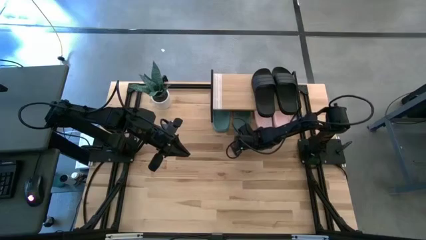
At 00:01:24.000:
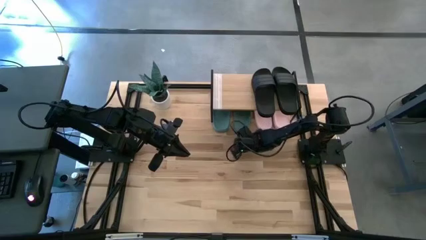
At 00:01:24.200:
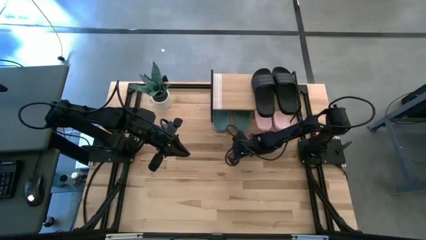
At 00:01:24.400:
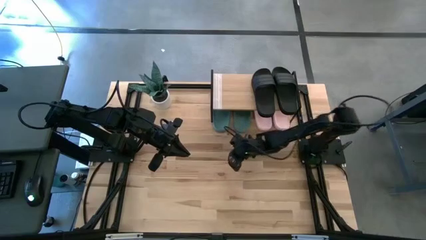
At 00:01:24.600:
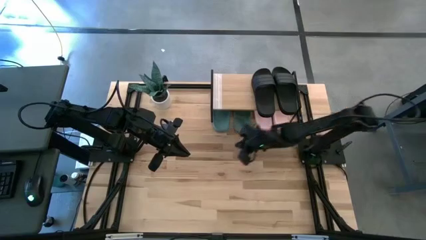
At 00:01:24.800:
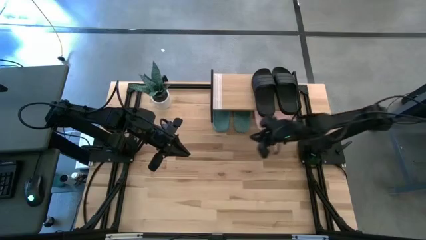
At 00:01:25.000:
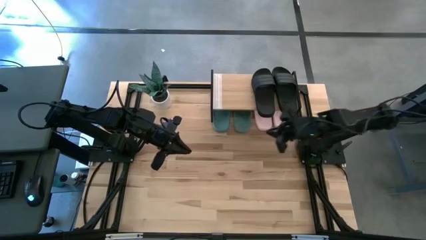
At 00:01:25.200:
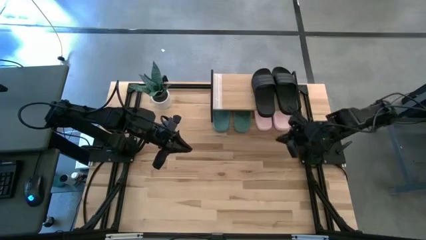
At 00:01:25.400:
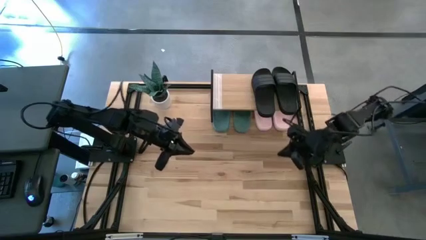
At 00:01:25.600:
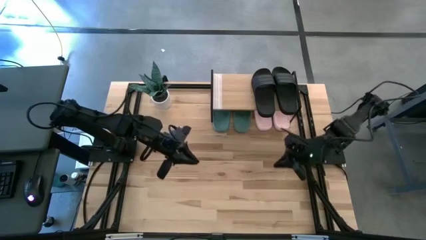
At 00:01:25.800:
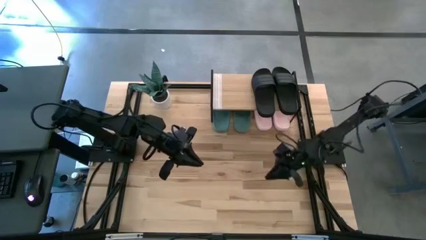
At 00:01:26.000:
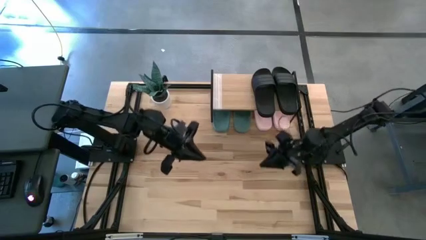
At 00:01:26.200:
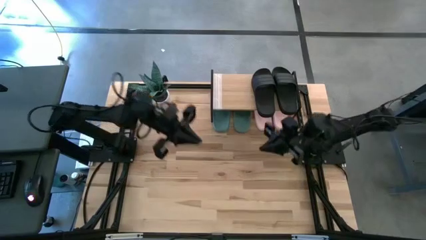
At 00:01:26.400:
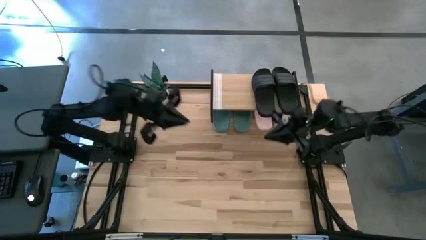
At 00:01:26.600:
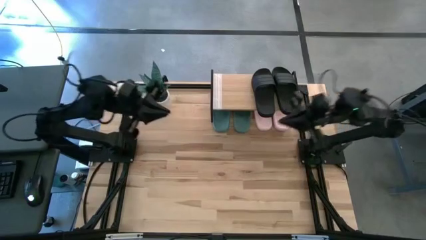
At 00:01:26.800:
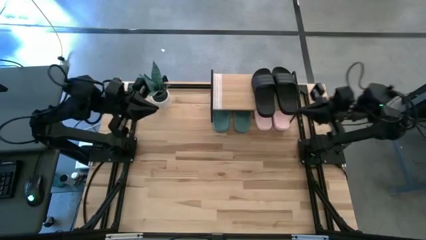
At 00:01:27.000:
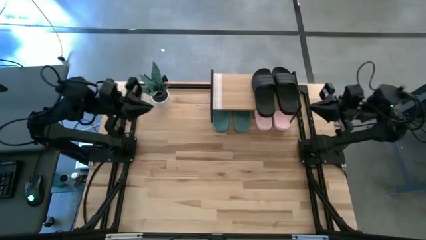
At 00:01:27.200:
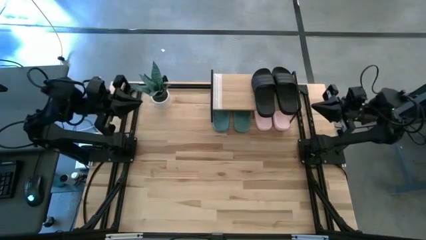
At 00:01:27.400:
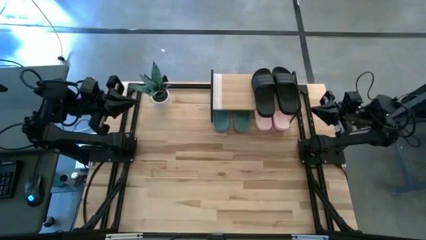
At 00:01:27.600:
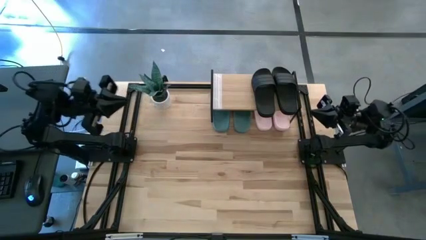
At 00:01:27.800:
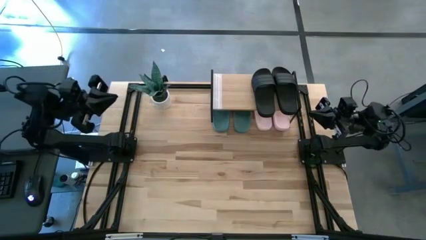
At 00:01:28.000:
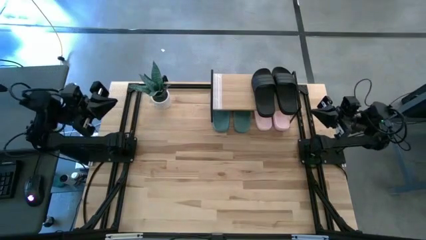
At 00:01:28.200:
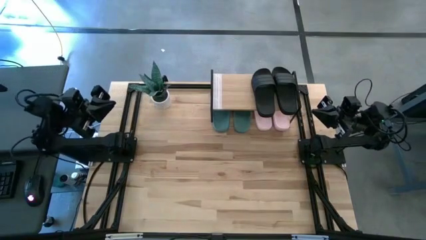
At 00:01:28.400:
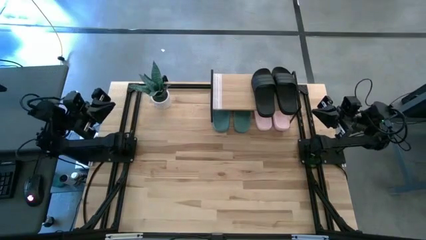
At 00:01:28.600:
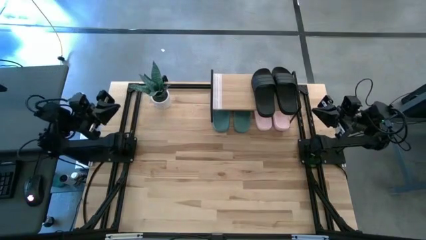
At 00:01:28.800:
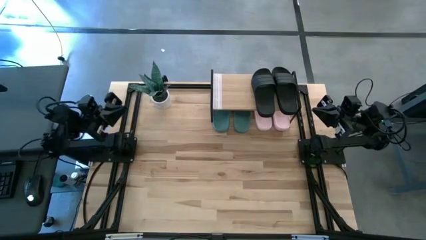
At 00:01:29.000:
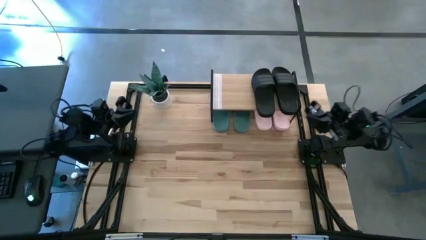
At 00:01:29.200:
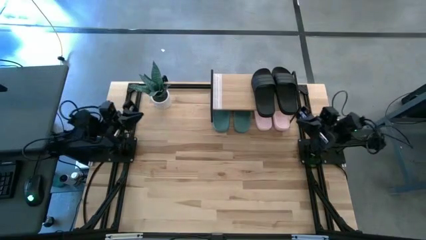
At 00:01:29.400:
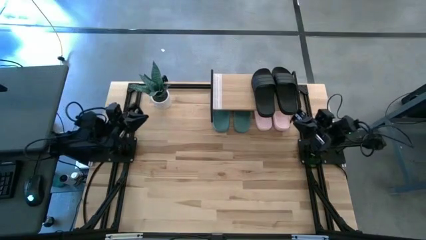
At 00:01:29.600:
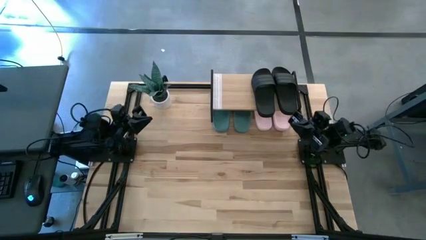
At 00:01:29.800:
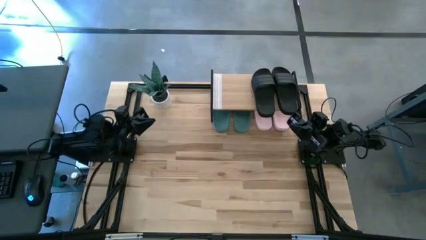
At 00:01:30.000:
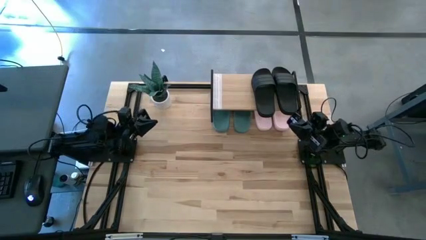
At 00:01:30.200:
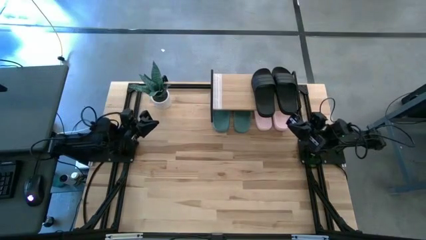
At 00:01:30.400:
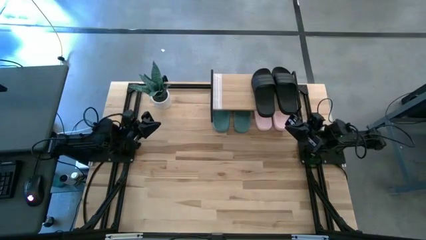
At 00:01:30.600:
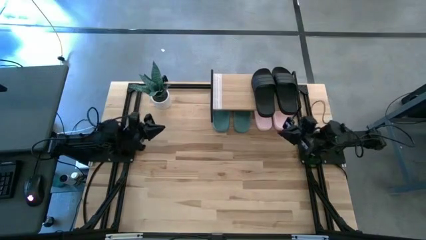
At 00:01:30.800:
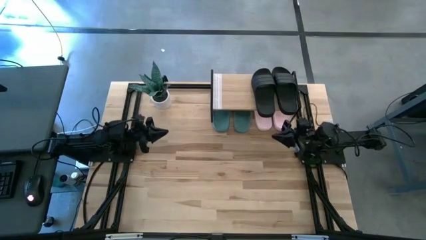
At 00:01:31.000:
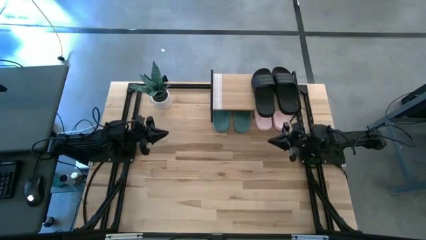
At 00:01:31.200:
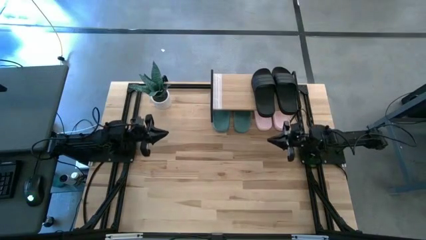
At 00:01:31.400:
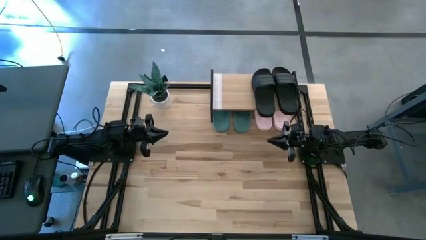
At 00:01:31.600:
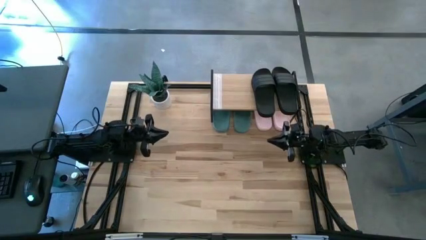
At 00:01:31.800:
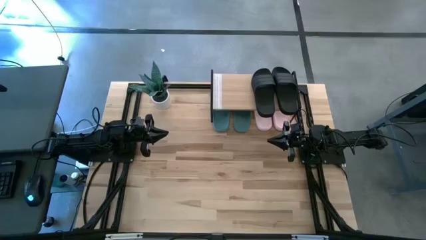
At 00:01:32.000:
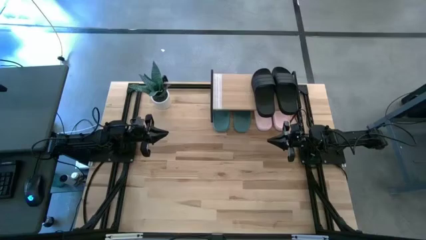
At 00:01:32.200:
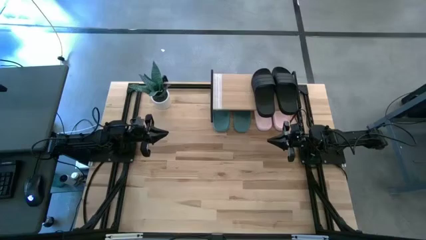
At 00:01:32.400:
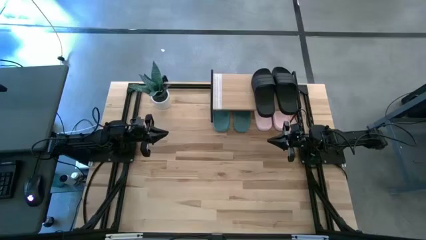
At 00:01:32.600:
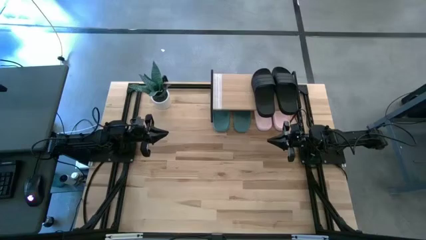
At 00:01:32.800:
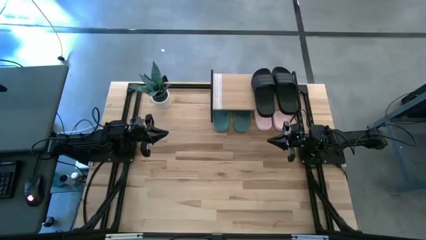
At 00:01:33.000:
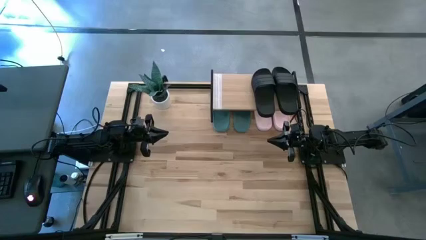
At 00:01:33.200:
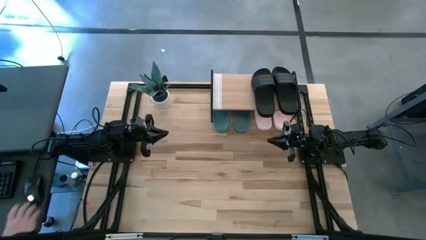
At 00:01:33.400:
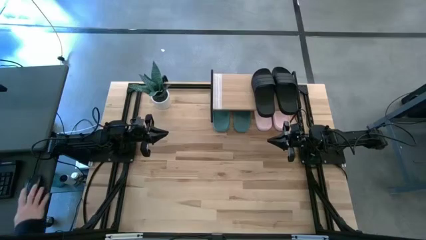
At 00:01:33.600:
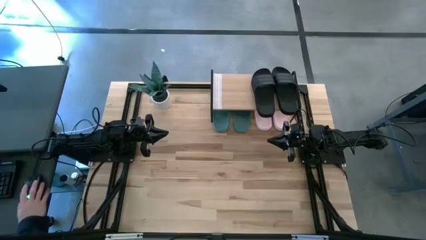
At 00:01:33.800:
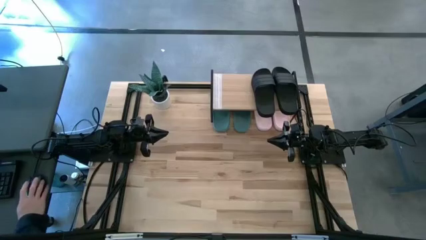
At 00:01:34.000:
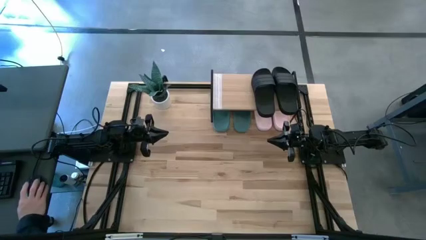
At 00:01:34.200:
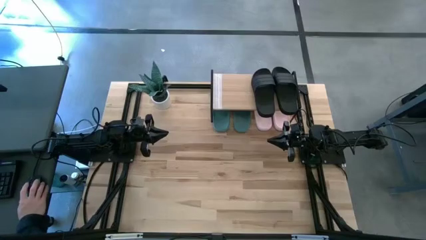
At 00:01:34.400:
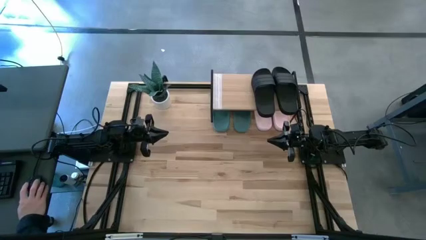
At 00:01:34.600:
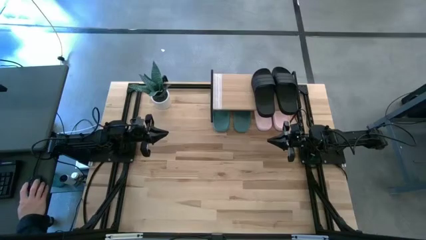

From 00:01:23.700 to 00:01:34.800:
Task: Pick and place slides into the shelf
Return to Home Position

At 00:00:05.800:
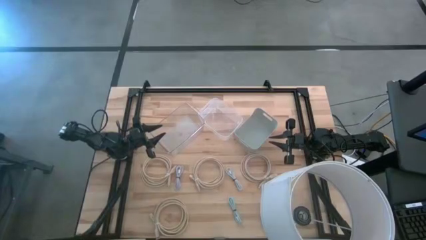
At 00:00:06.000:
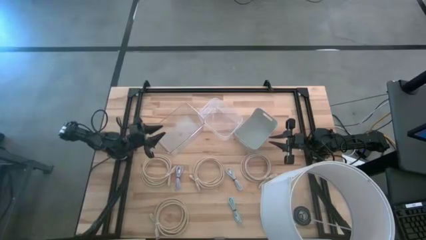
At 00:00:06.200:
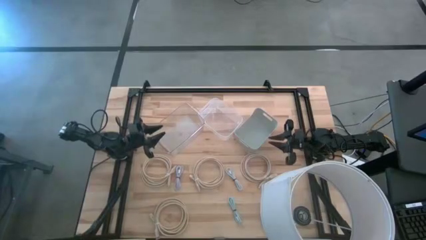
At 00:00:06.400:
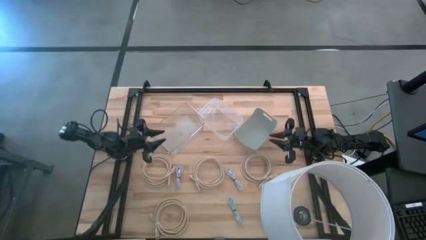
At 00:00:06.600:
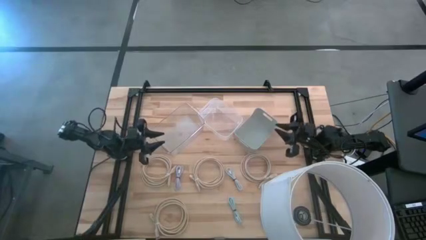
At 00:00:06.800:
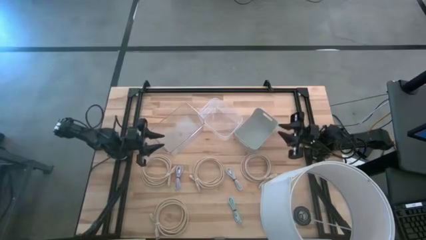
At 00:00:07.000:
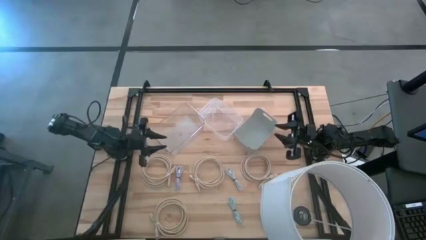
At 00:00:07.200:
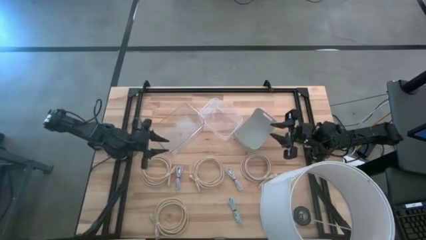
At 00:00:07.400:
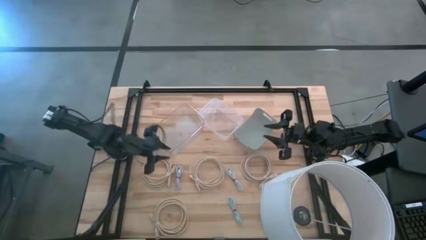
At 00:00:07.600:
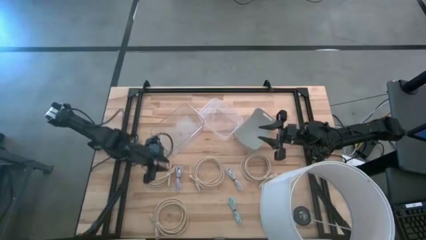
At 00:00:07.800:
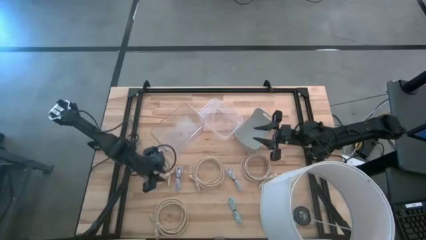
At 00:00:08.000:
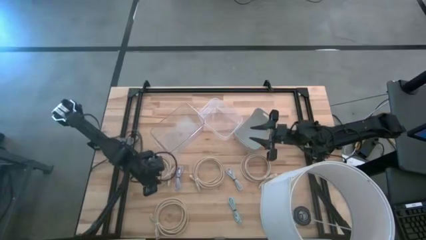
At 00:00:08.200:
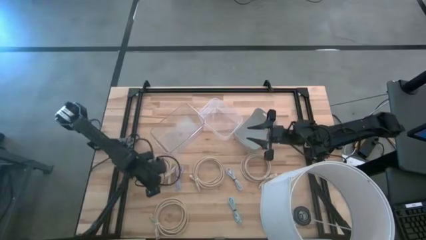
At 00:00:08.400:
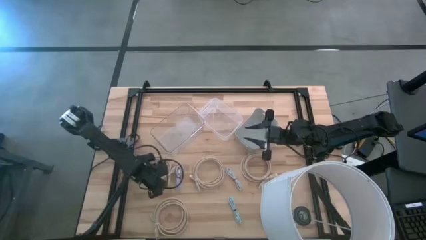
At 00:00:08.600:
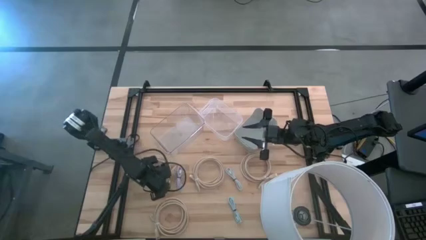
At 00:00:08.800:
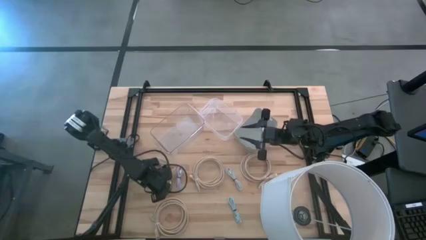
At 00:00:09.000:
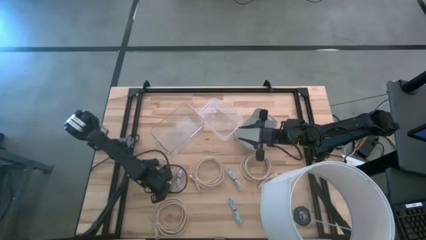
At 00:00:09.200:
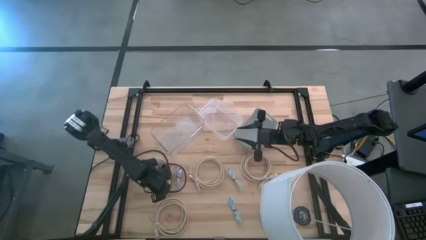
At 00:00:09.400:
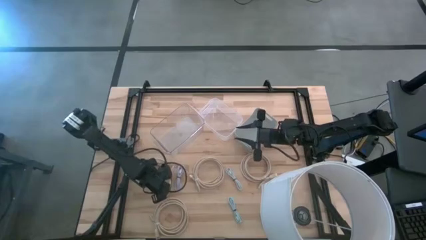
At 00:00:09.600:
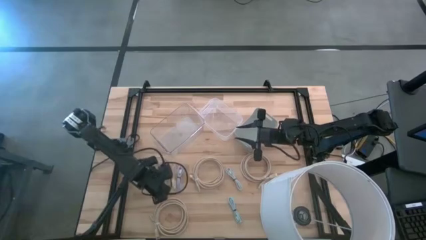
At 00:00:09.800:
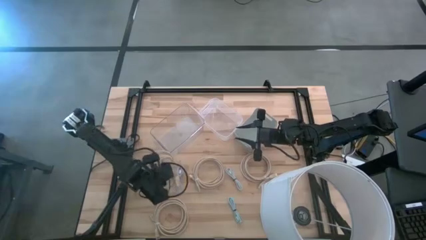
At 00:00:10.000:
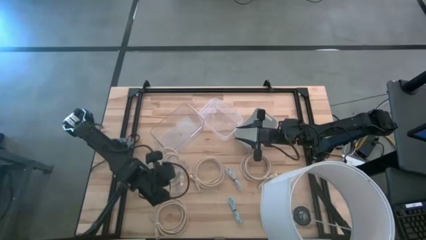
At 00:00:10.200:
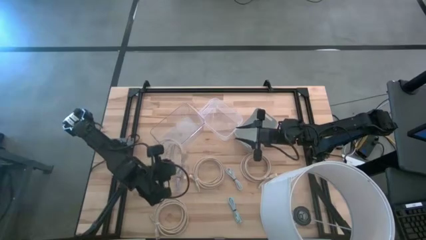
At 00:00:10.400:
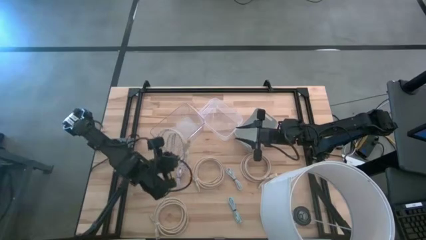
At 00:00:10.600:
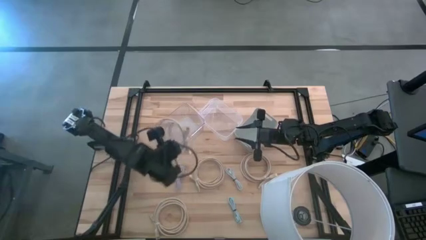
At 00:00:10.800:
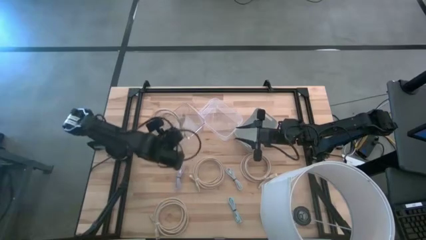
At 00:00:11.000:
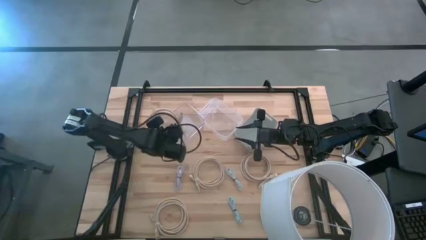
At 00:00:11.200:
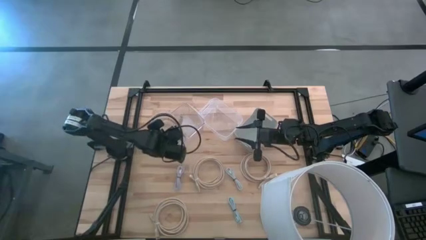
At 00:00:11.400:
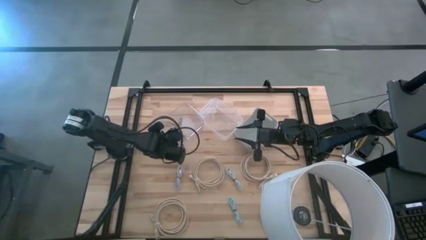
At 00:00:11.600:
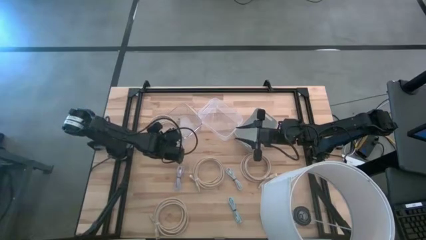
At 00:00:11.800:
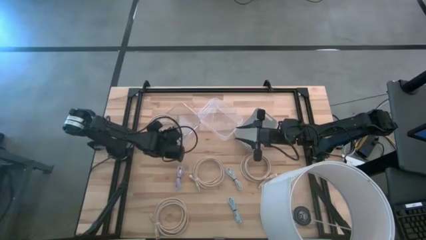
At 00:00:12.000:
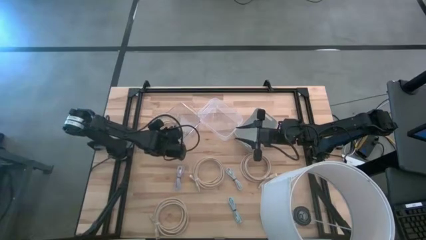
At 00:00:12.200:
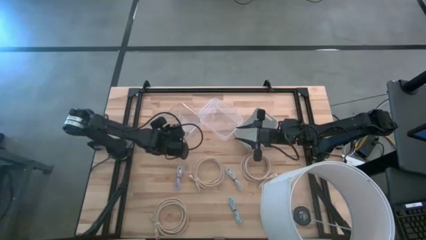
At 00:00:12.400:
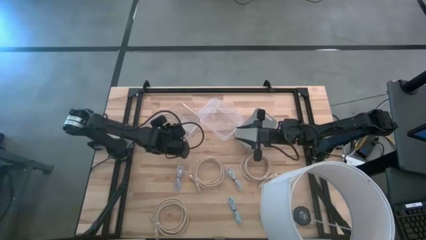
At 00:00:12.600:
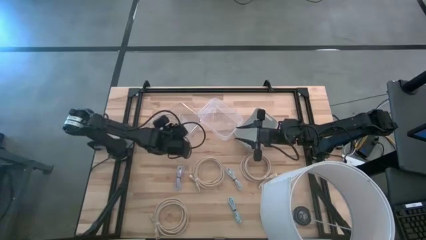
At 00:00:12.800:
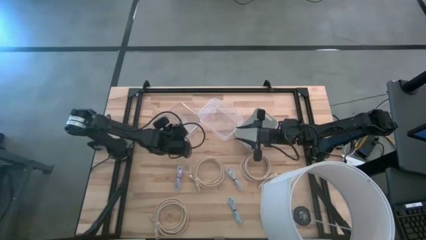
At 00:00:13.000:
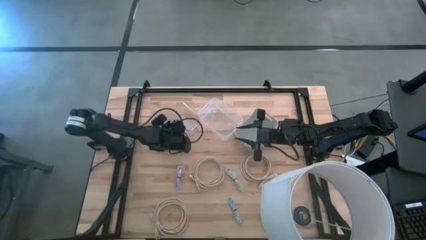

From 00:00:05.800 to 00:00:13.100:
Task: Pick & Place USB Port
Put the light brown HDMI cable into the left transparent bin
